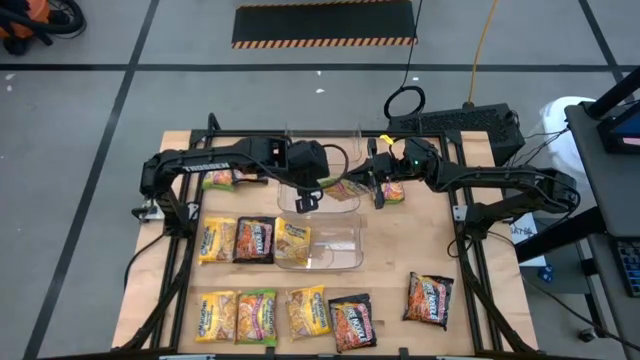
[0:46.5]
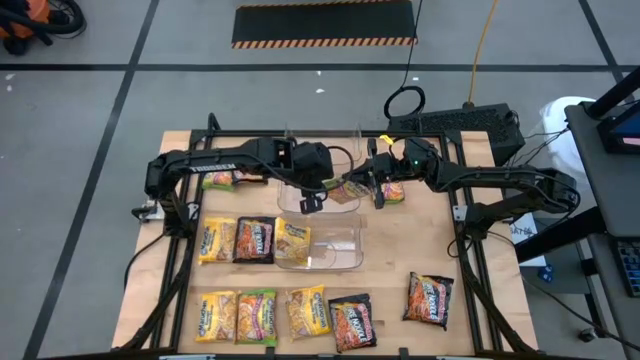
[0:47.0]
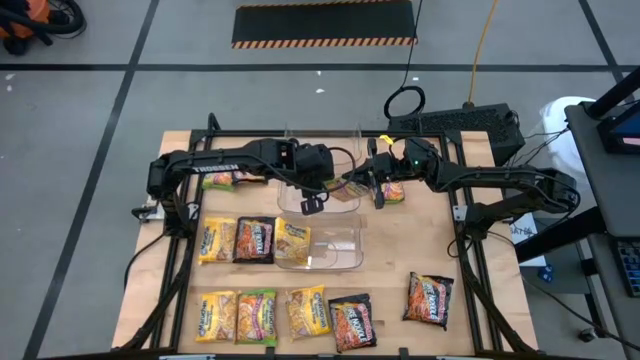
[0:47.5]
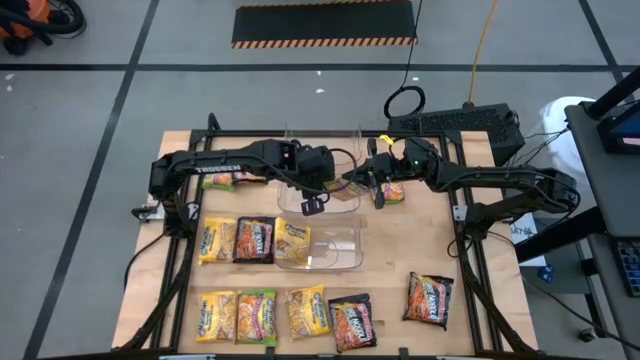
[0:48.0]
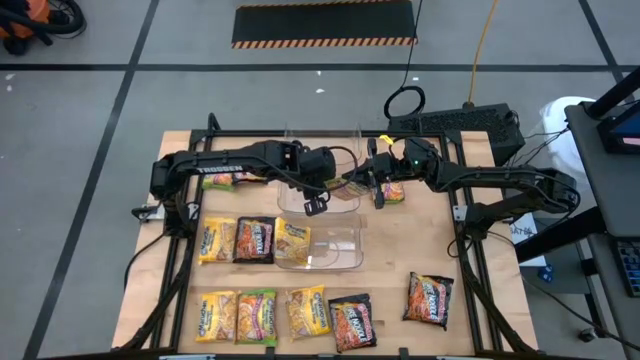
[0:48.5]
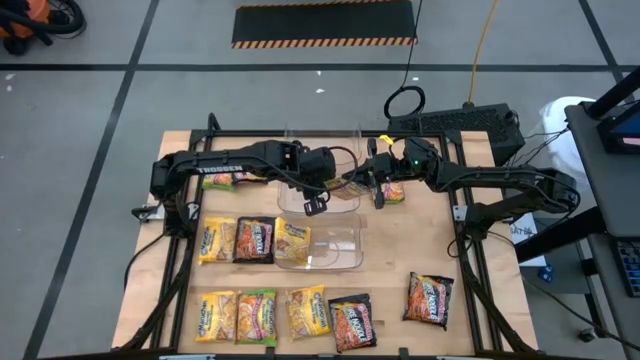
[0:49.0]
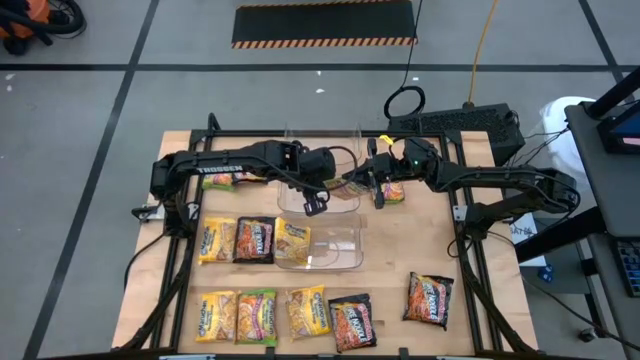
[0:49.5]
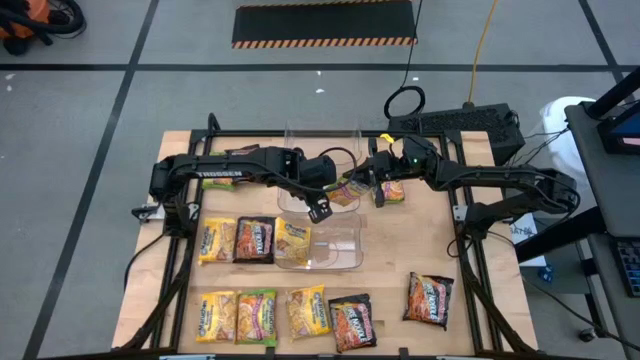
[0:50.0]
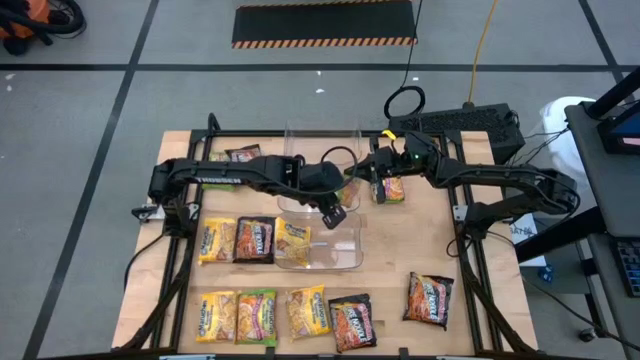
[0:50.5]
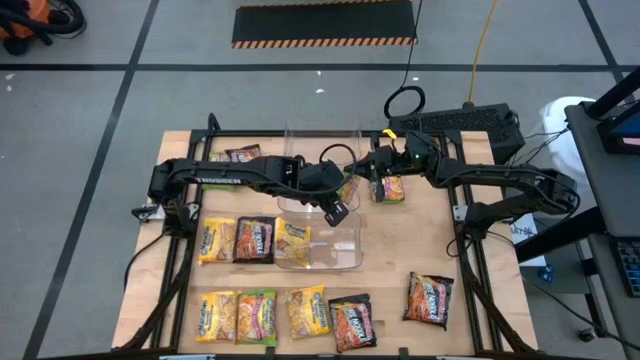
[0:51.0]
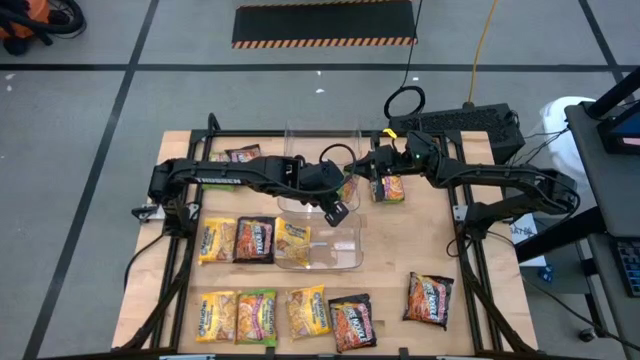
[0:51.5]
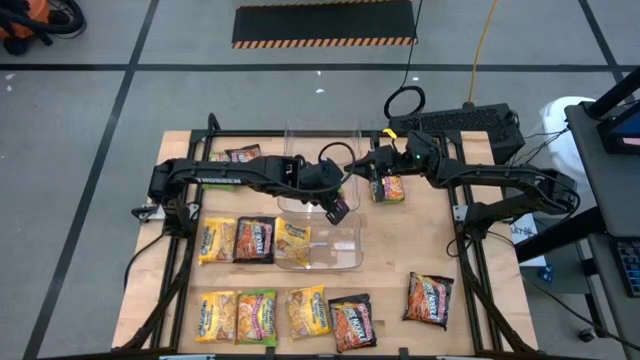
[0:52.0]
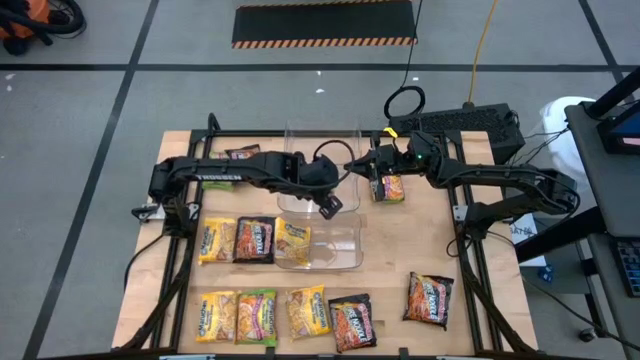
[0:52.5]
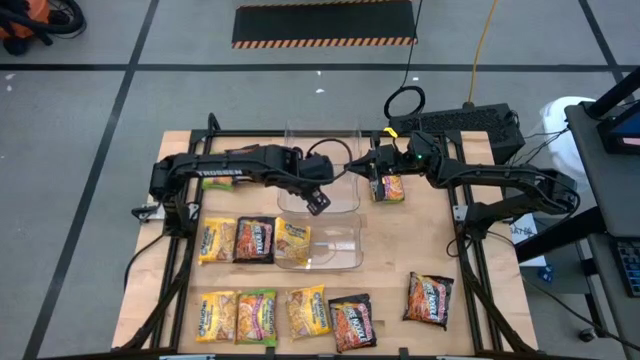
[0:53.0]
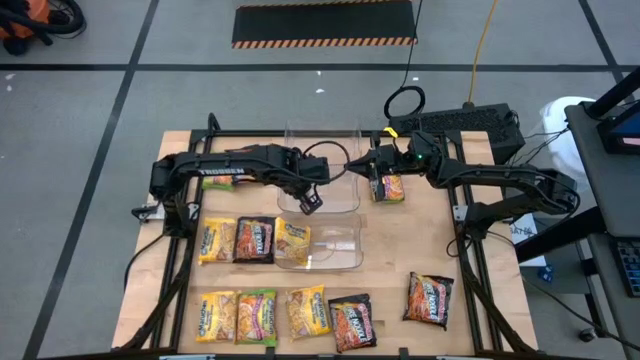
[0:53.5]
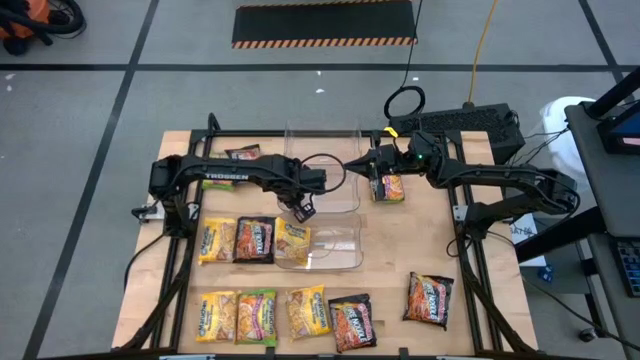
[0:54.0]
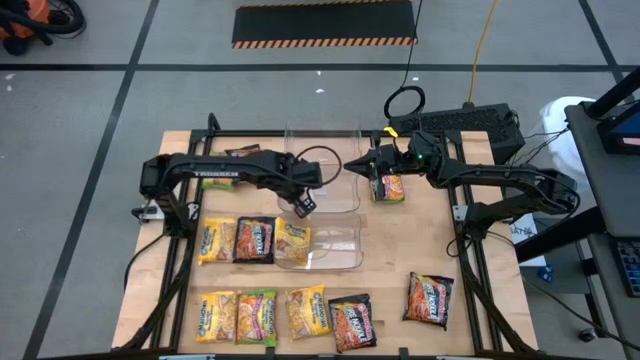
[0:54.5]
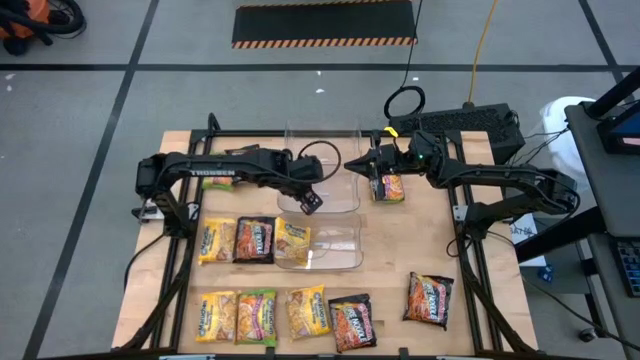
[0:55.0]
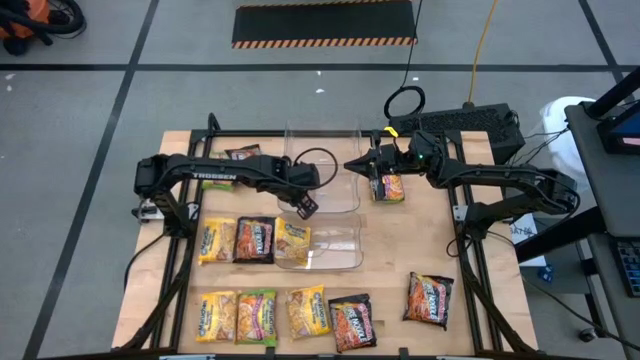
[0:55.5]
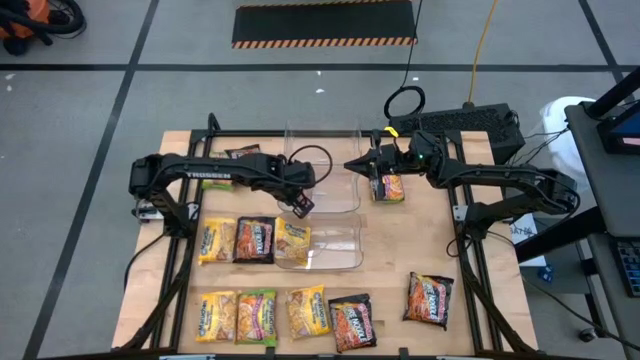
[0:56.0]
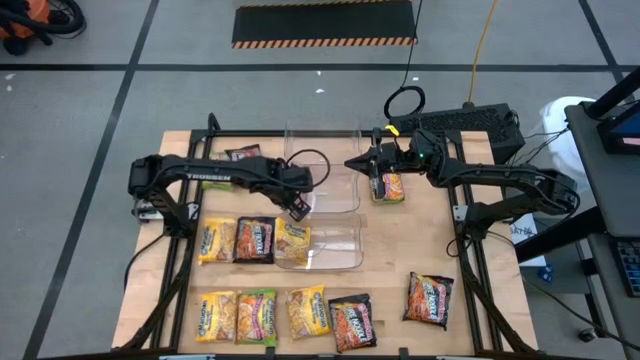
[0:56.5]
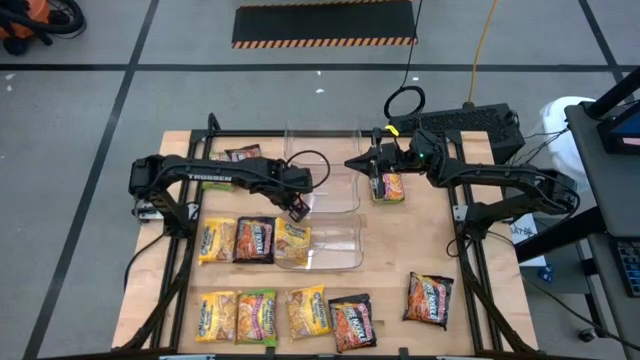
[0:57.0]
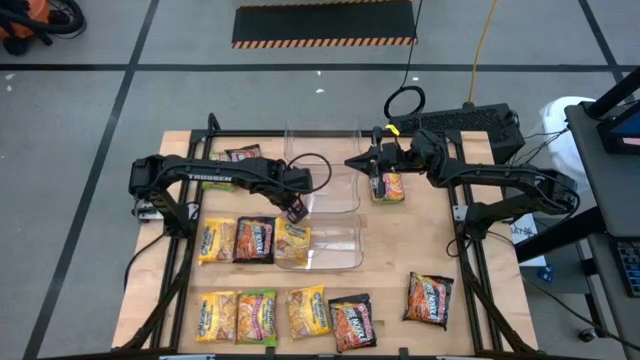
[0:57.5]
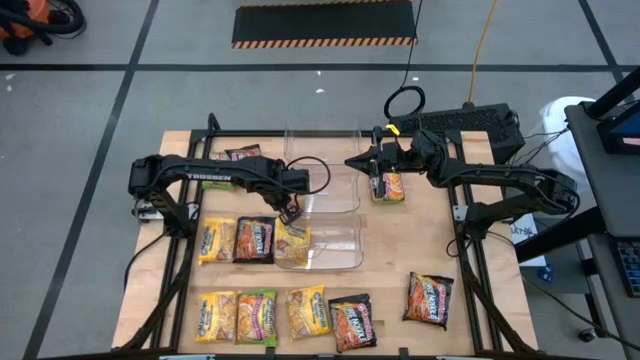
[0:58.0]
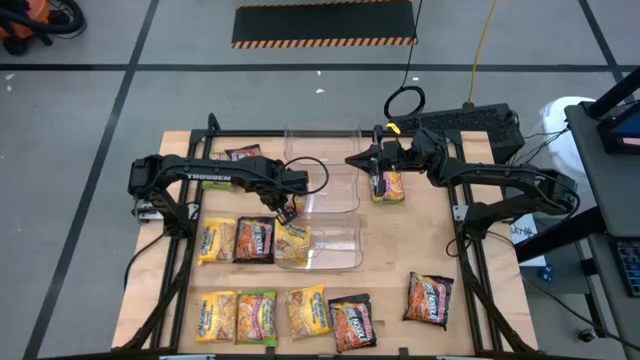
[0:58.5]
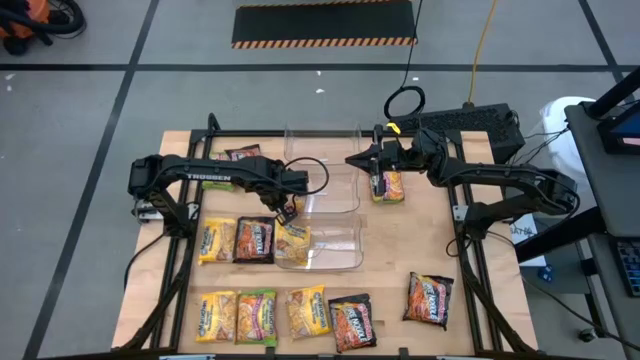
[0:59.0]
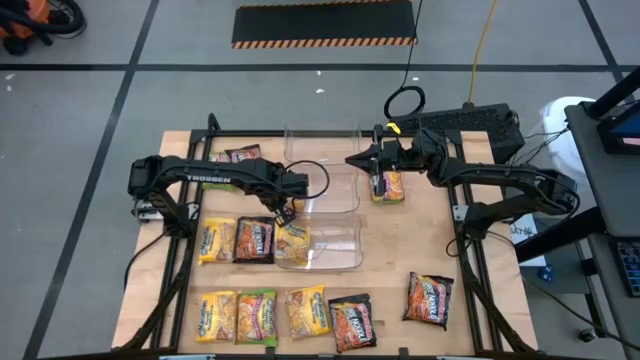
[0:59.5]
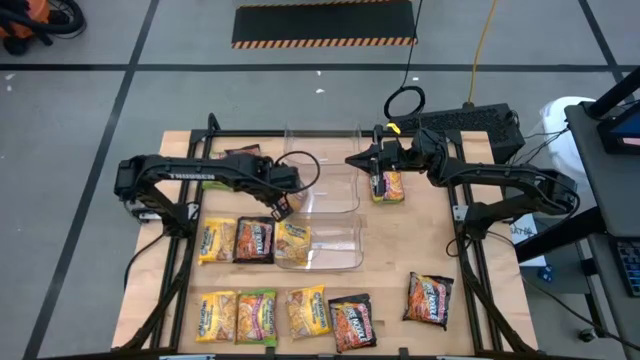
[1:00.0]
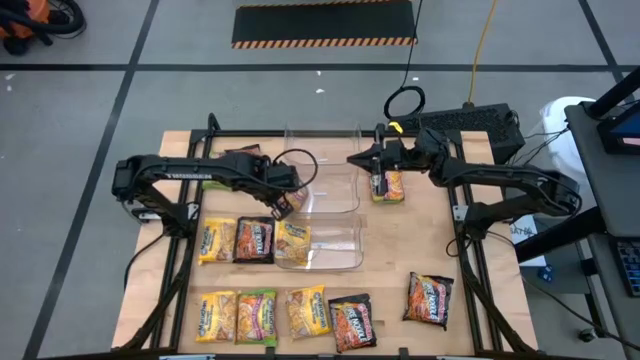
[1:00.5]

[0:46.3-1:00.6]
Task: Sort Maruchan noodles
Put the green noodle pack into the center transparent bin

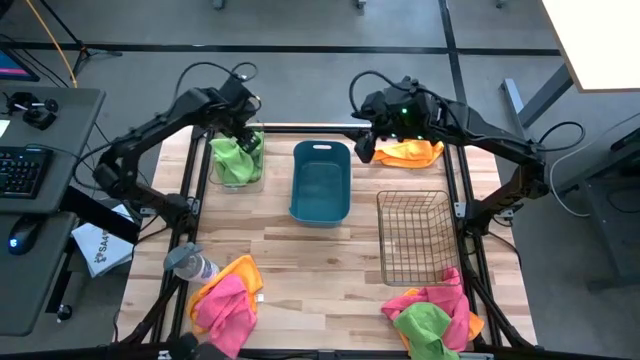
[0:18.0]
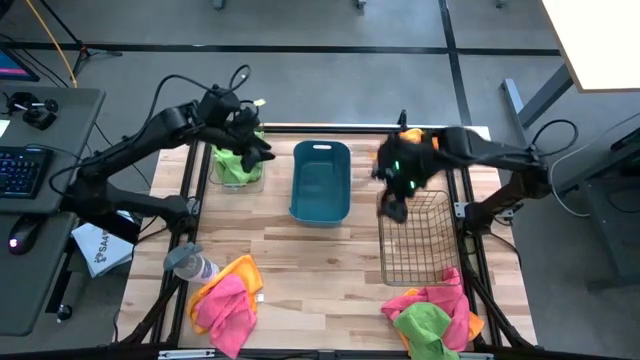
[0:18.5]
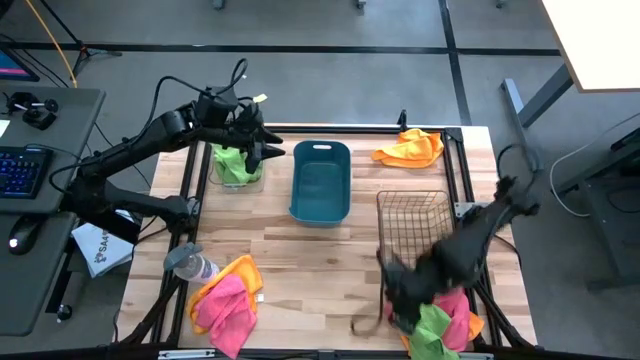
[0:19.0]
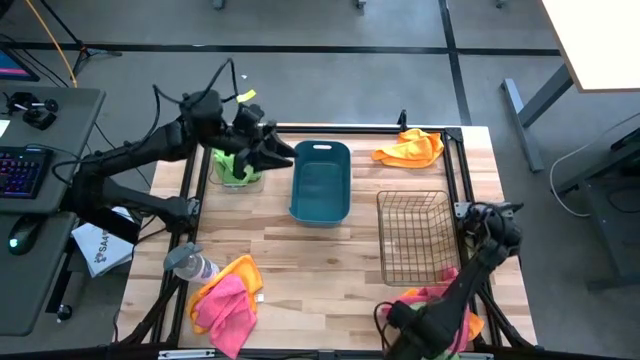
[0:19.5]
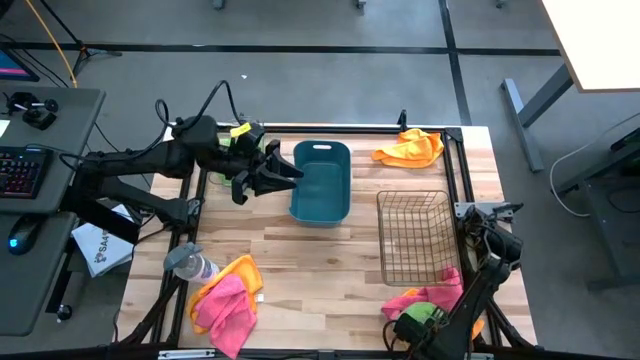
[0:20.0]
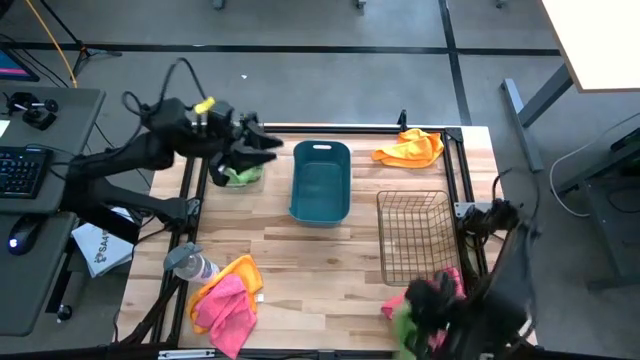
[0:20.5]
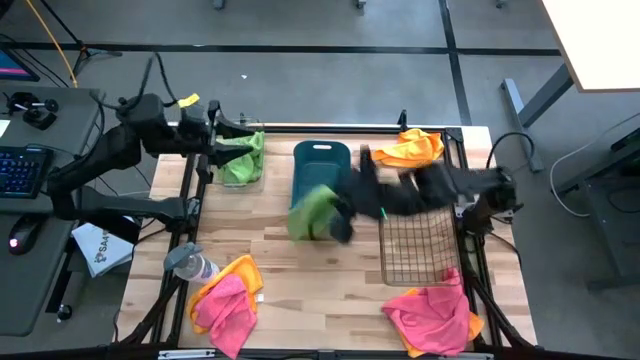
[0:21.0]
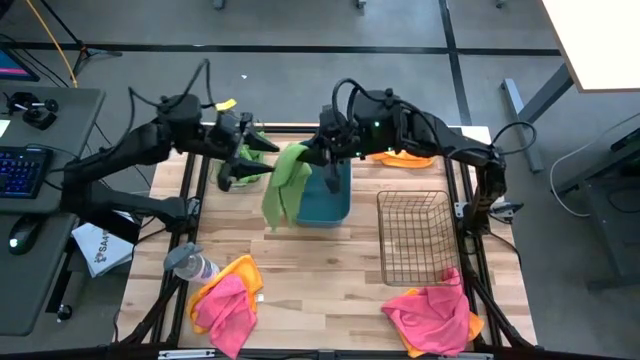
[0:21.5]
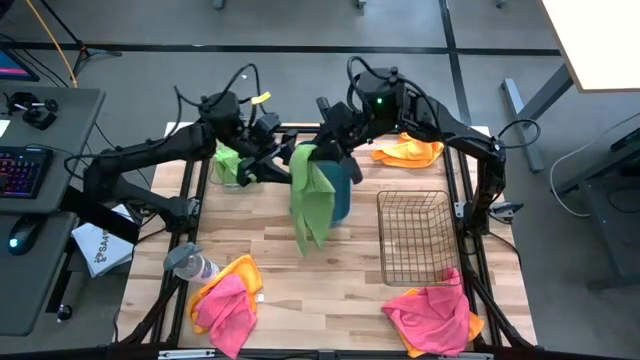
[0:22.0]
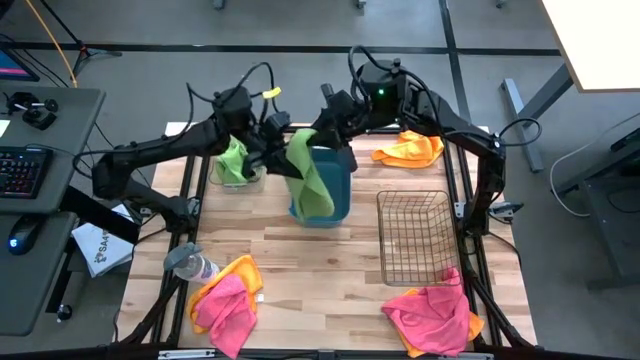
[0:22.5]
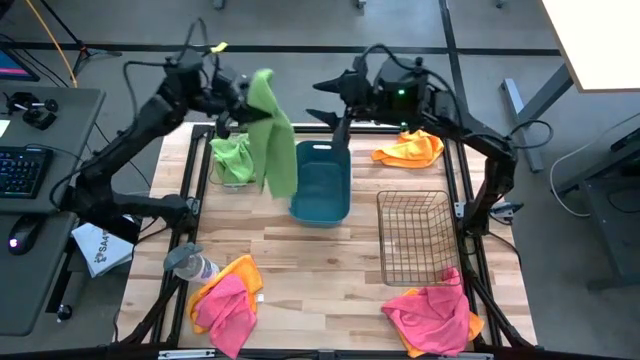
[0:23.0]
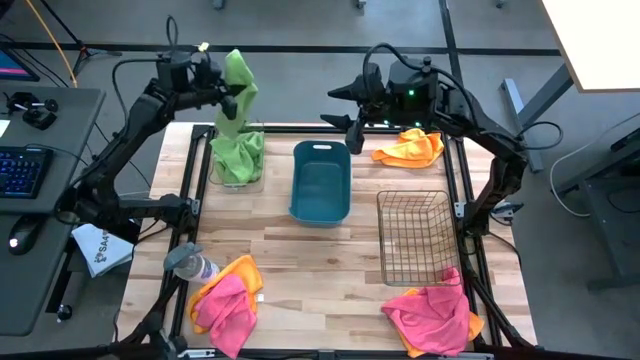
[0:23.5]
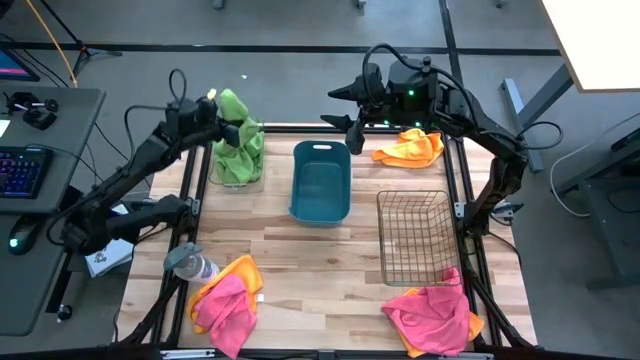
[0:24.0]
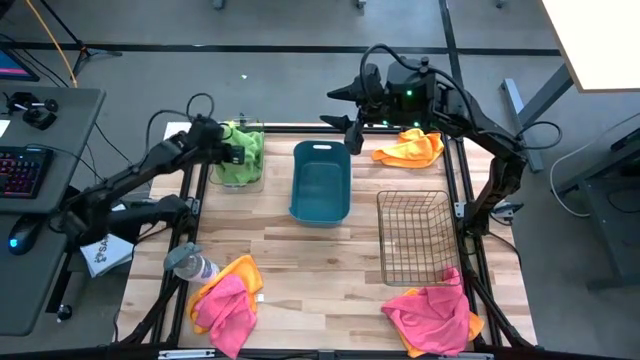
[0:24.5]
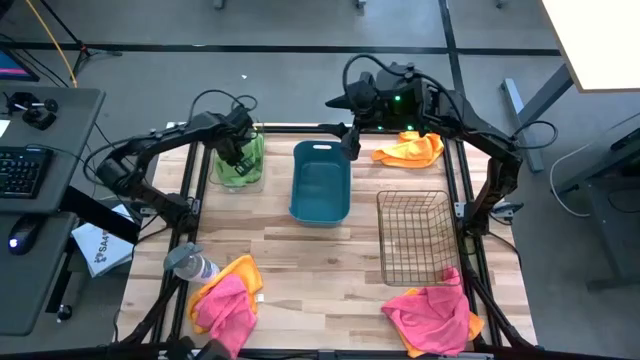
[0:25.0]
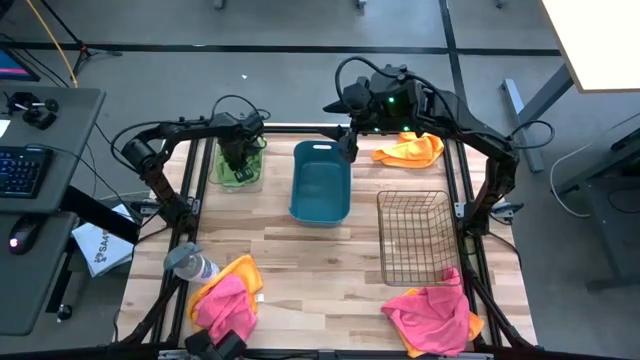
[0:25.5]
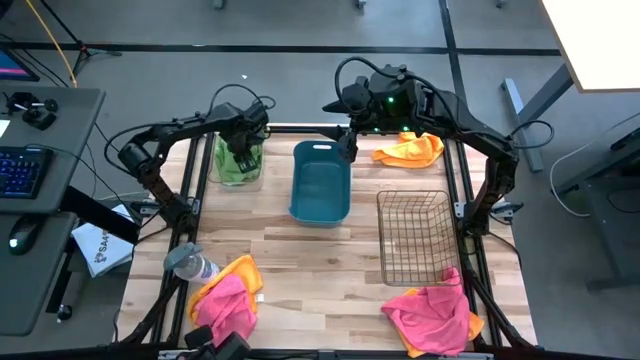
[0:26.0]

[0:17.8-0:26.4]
Task: Sort microfiber towel by color & place in baskets
Put the green towel into the transparent bin
